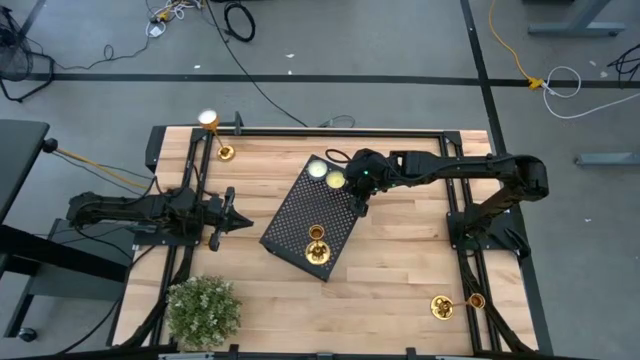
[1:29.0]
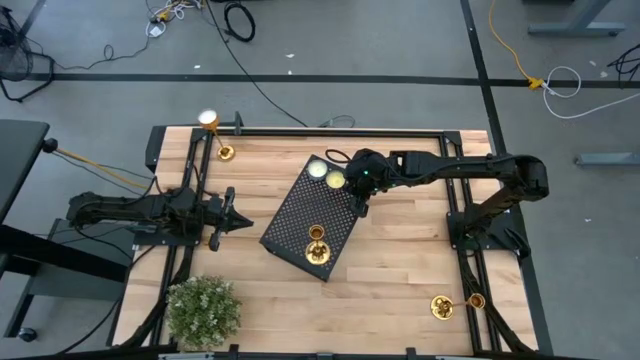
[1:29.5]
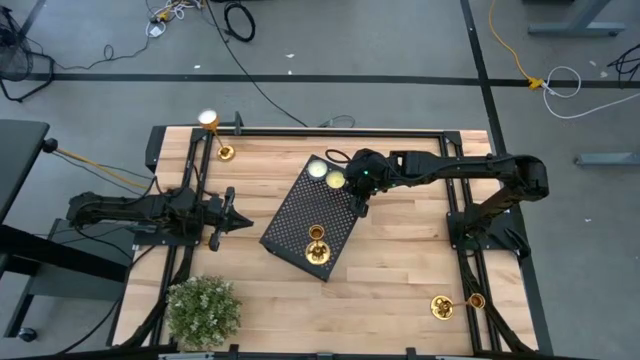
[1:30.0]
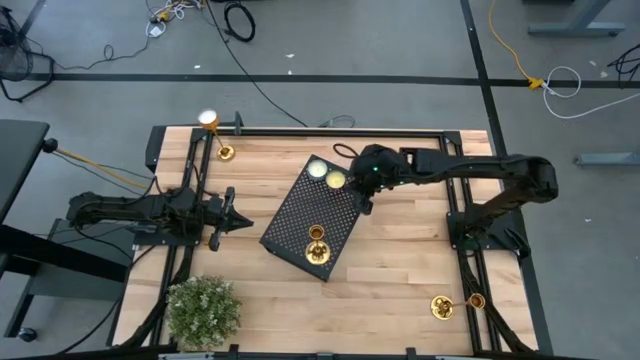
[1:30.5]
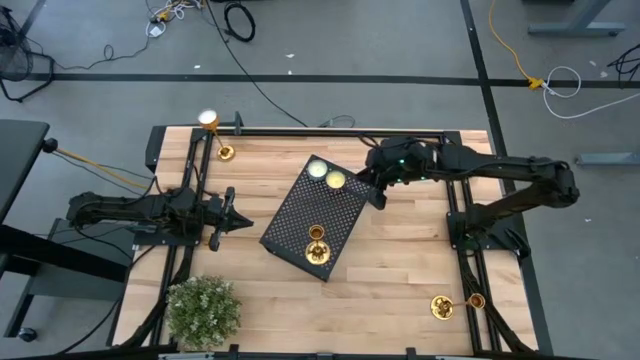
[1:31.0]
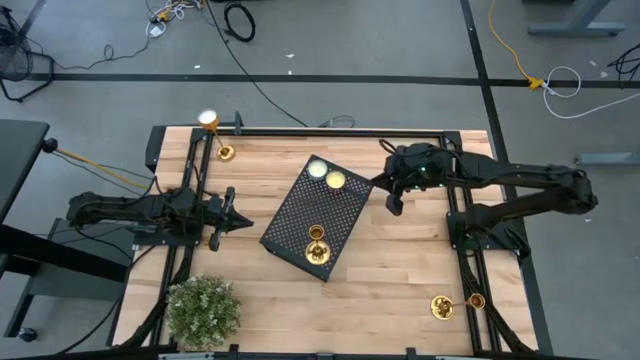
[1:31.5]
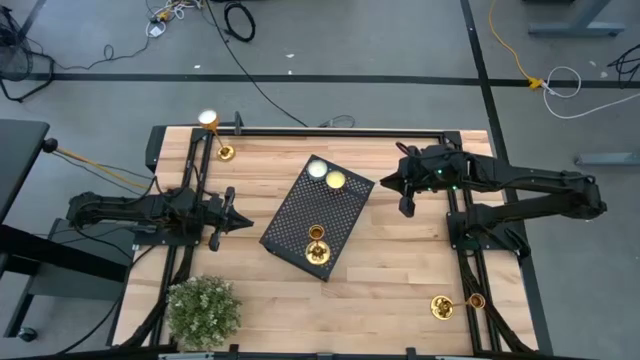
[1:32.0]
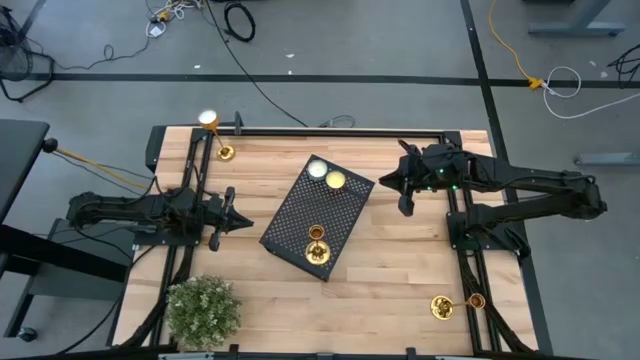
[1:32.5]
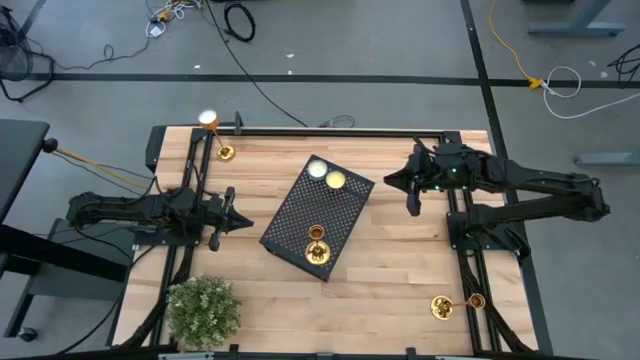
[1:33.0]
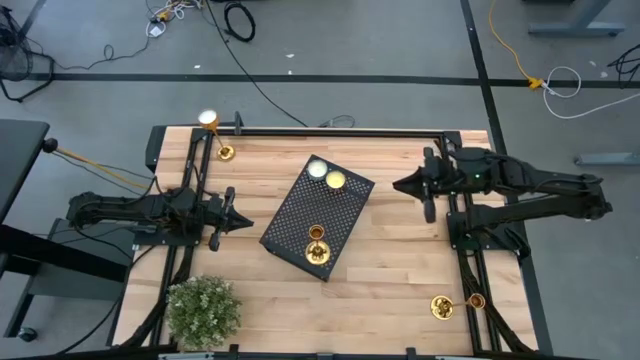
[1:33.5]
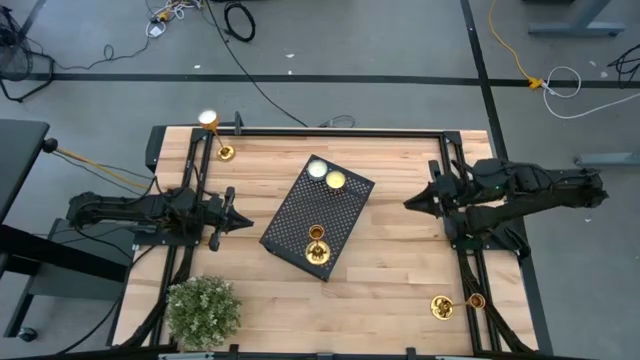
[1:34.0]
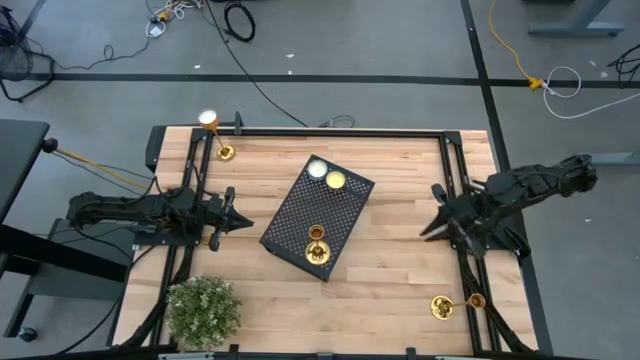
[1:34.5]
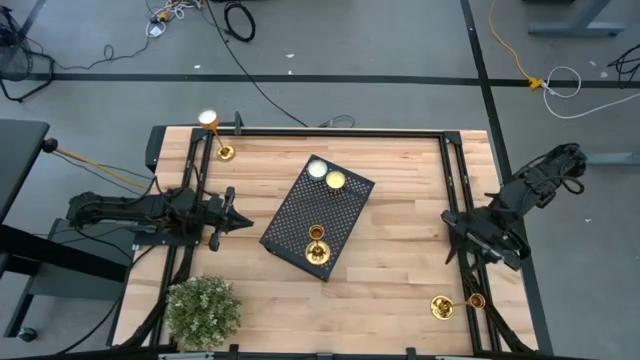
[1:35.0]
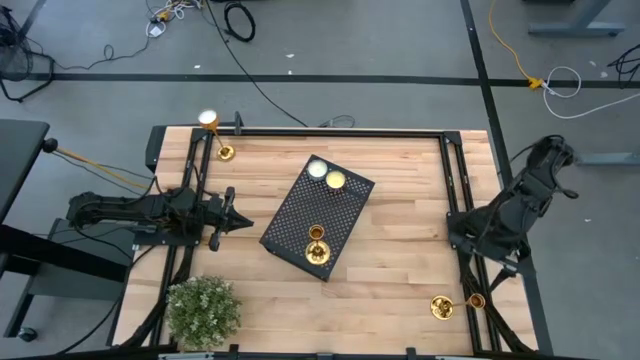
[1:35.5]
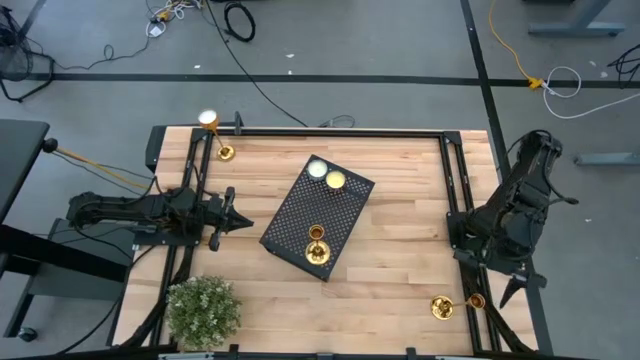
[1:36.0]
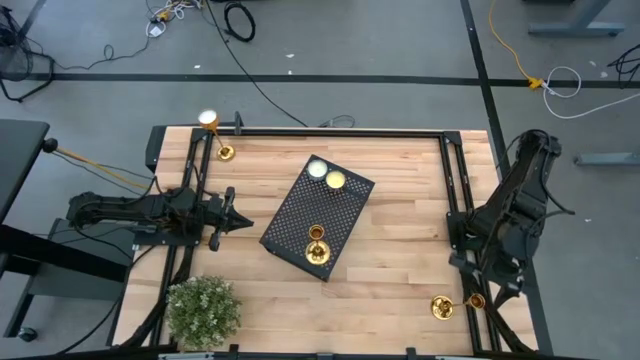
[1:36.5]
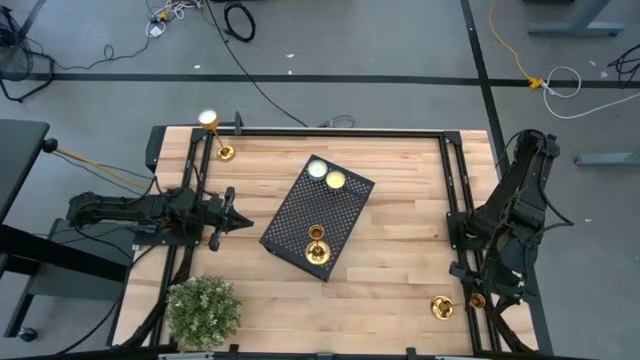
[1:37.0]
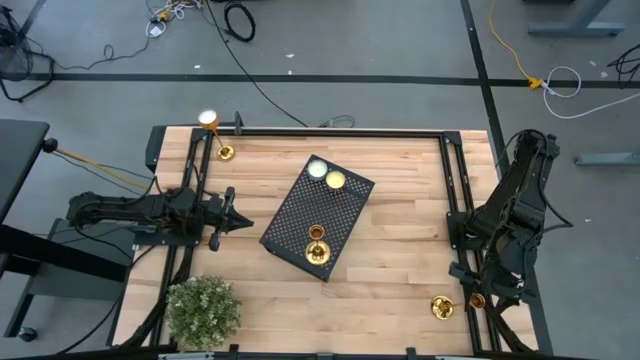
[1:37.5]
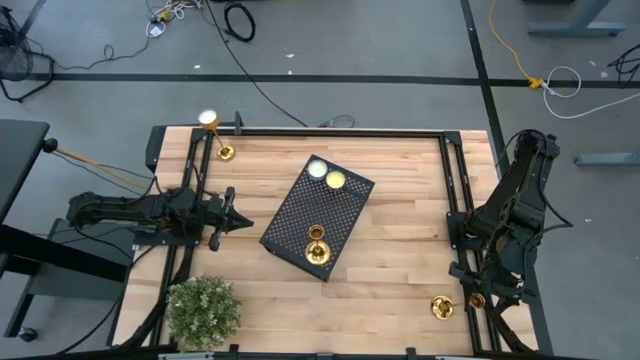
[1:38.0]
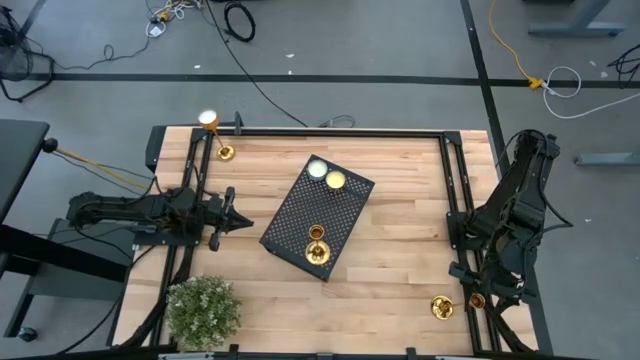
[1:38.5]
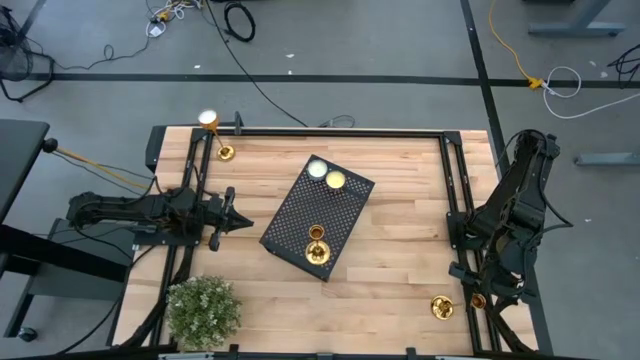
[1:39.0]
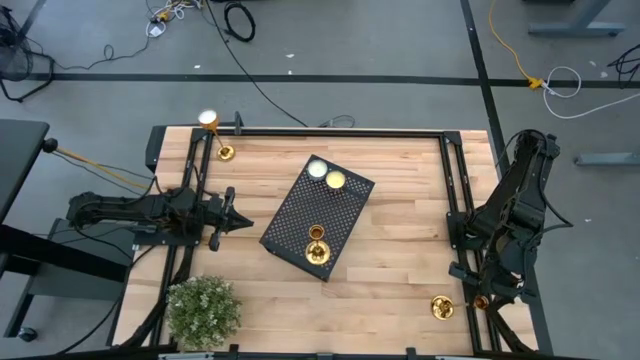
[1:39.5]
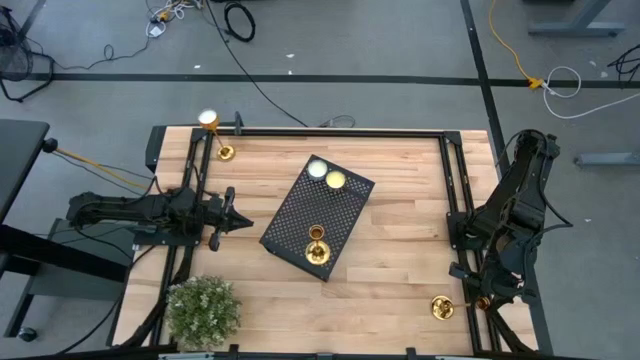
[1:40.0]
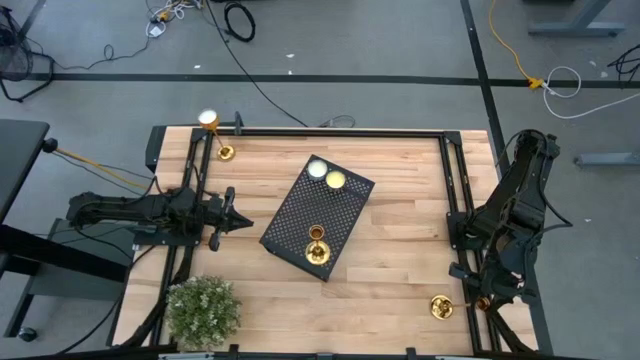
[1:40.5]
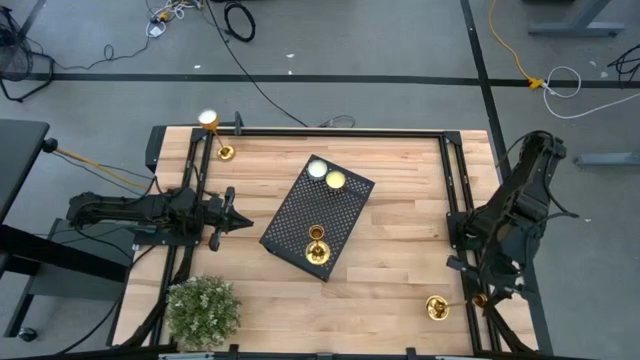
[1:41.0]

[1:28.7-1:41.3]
Task: Stock candles on shelf
Put the bottom gold candle holder on the shelf

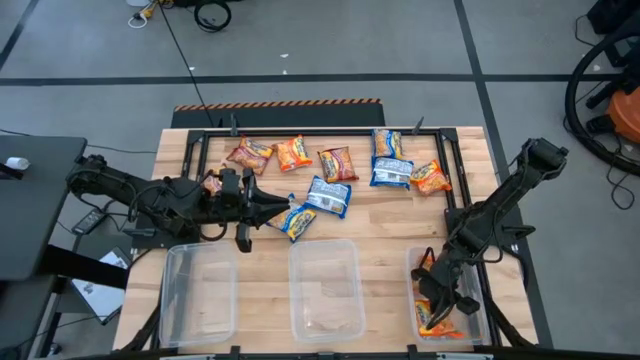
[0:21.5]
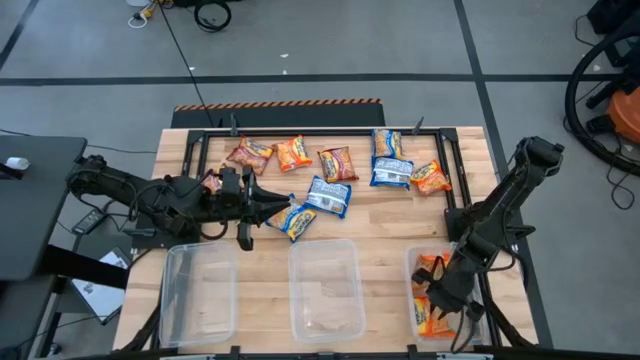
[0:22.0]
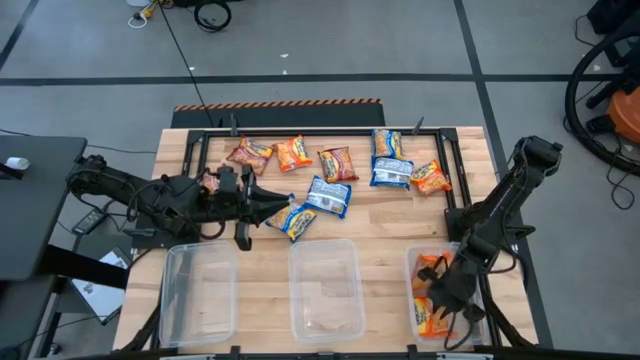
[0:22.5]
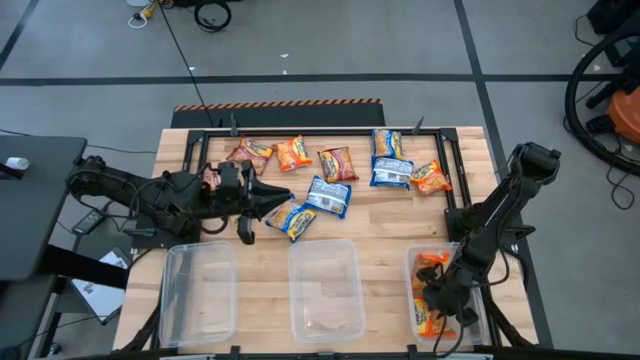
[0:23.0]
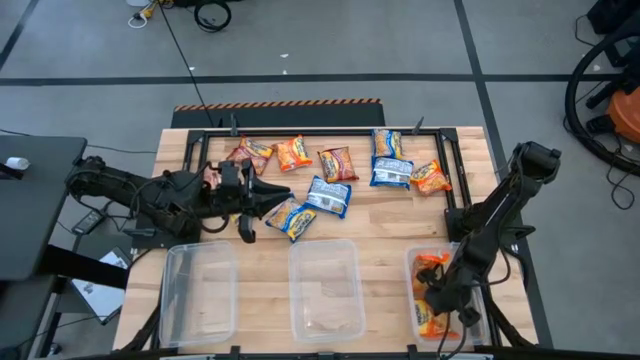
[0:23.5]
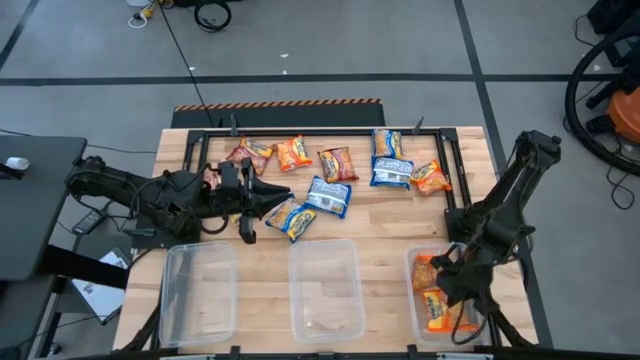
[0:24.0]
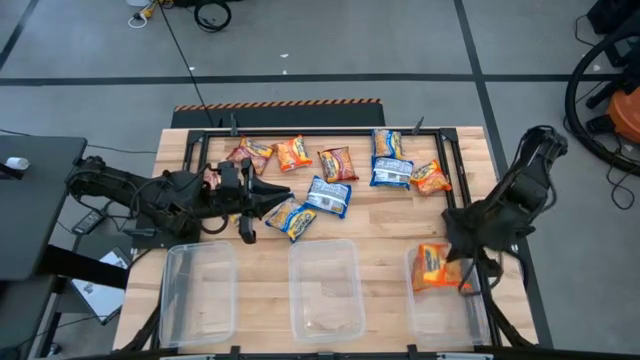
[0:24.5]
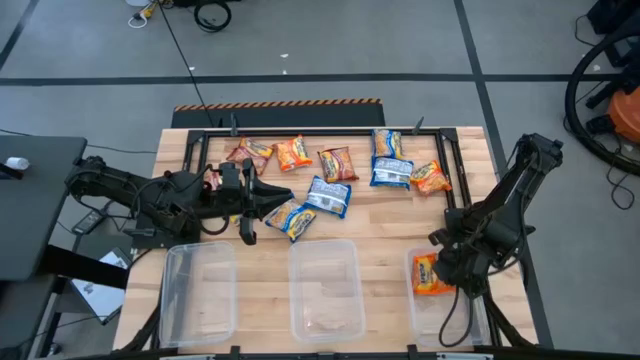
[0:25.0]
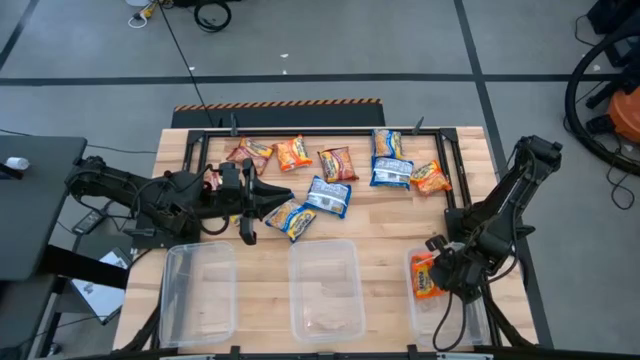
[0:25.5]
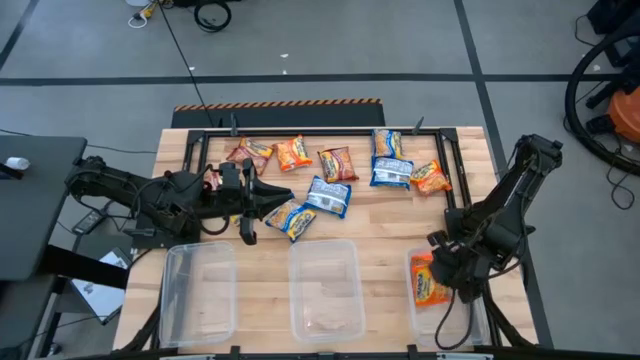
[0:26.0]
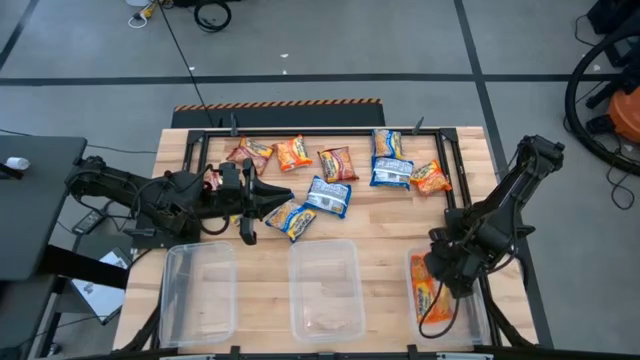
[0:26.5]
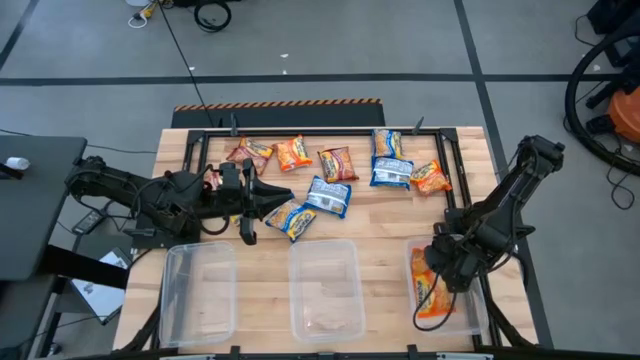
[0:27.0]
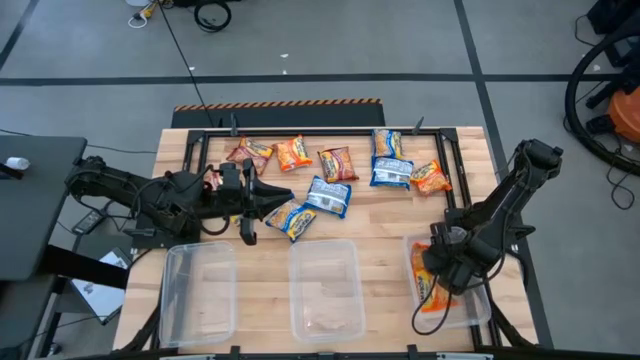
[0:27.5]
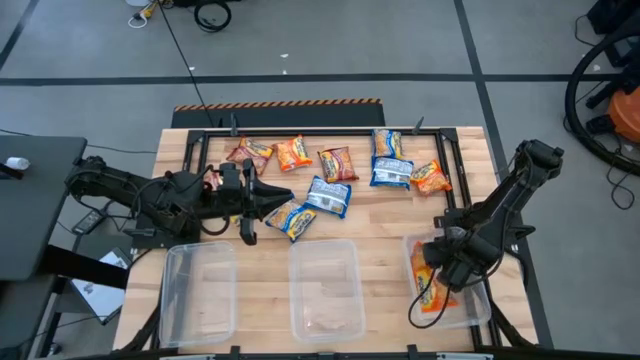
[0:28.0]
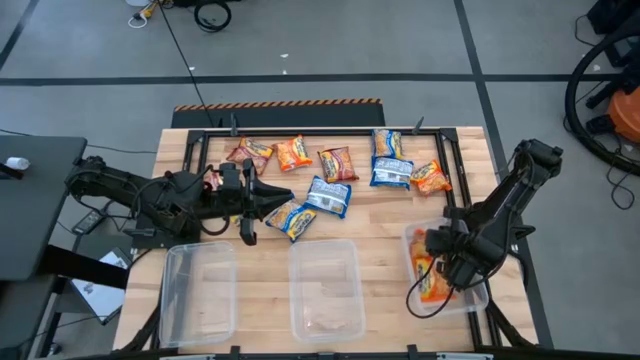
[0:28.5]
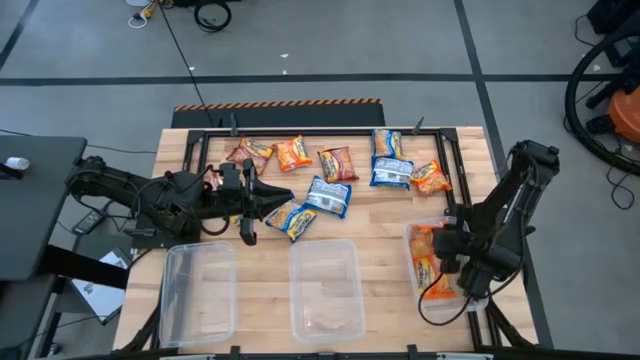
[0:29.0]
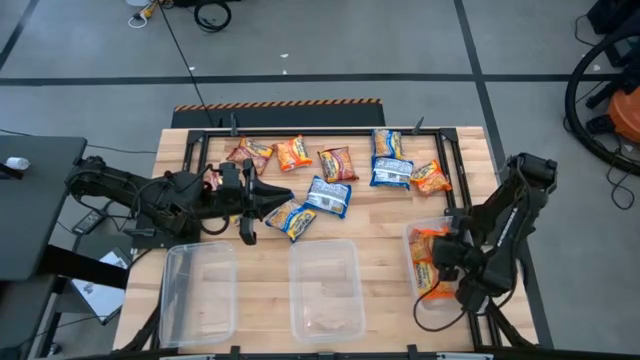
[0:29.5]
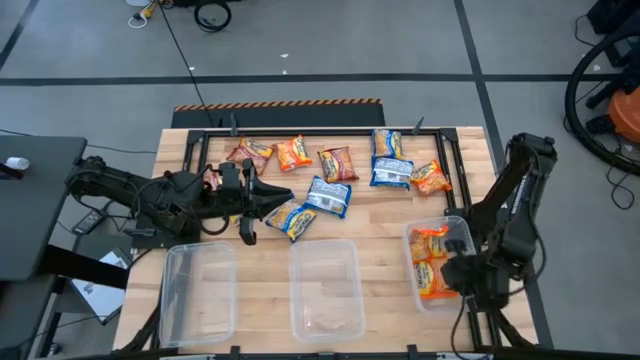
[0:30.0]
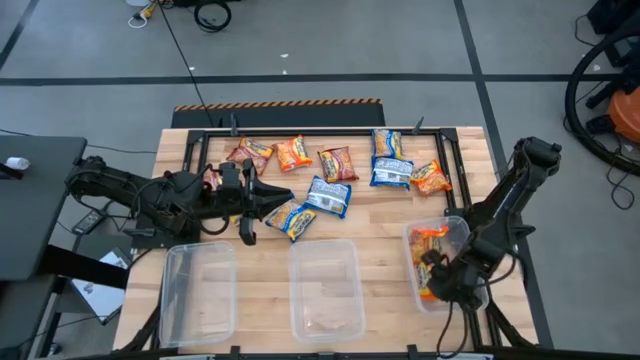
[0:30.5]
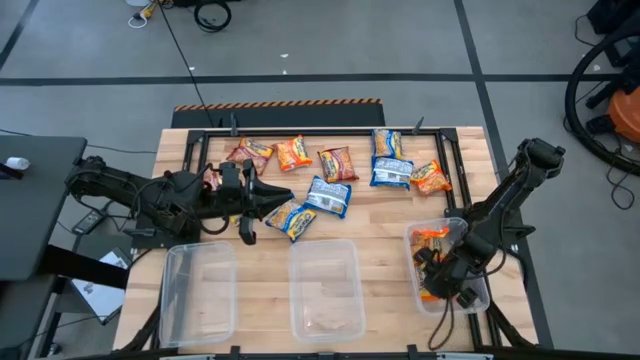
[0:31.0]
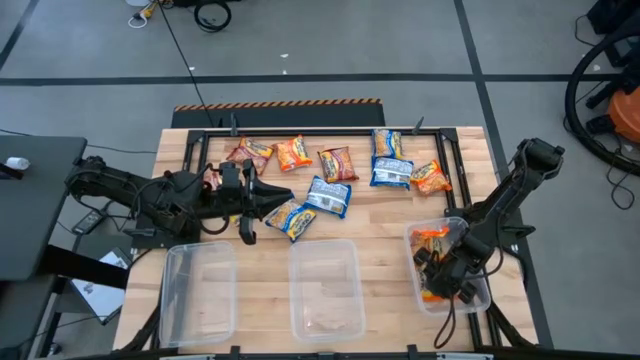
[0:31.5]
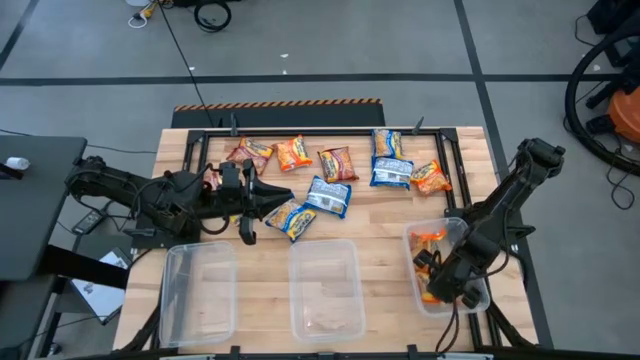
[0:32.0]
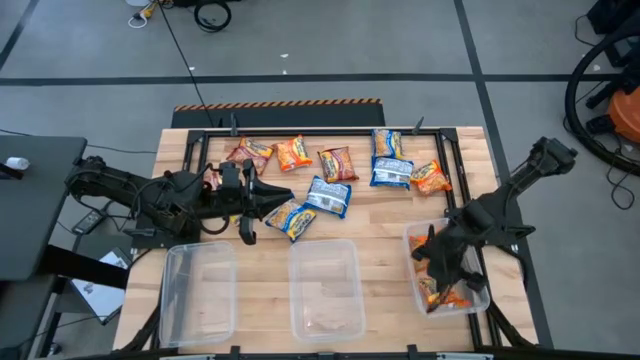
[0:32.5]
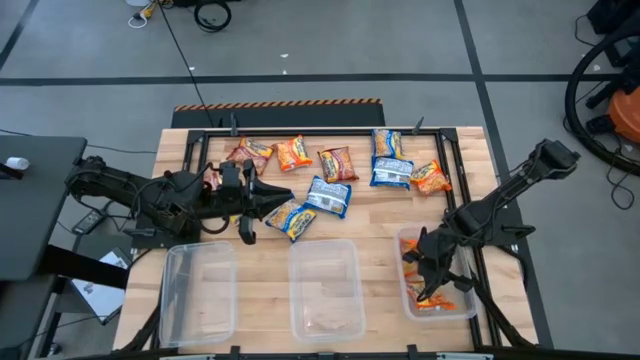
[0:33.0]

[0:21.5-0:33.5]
Task: Sort Maruchan noodles
Adjust the orange noodle pack on the right transparent bin
